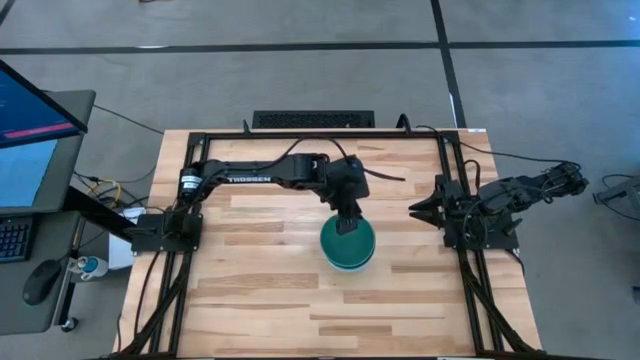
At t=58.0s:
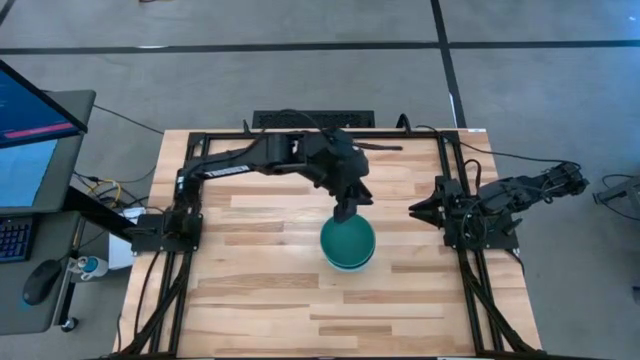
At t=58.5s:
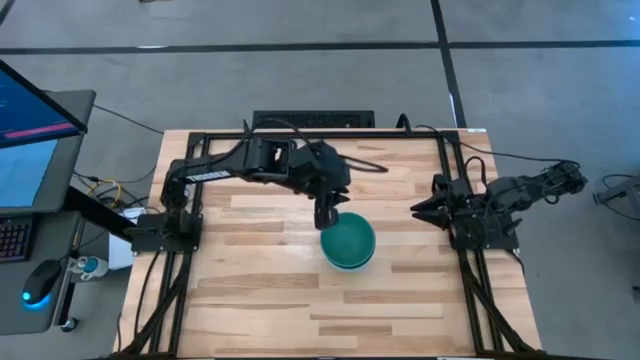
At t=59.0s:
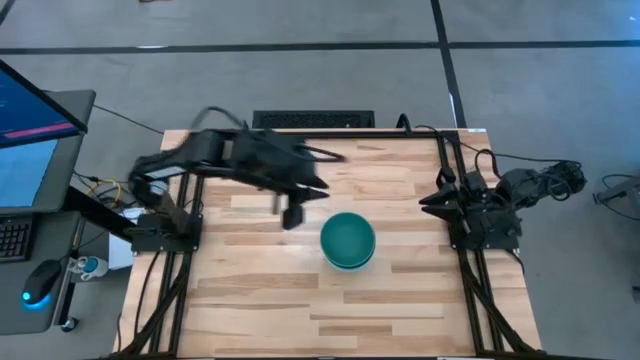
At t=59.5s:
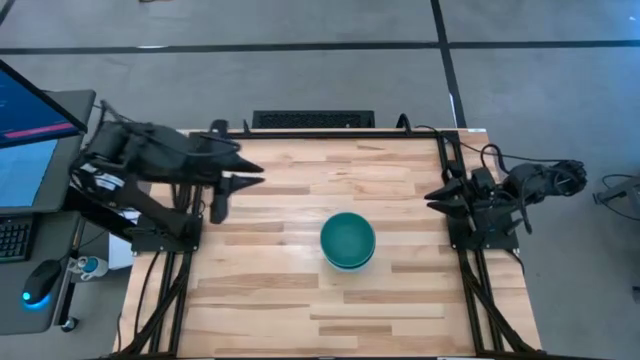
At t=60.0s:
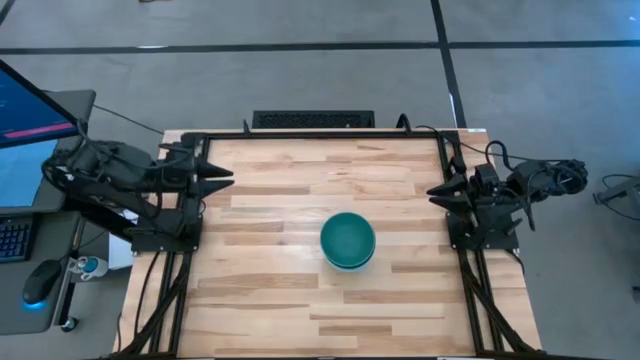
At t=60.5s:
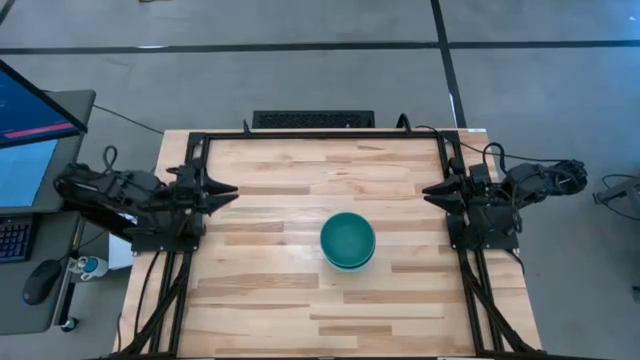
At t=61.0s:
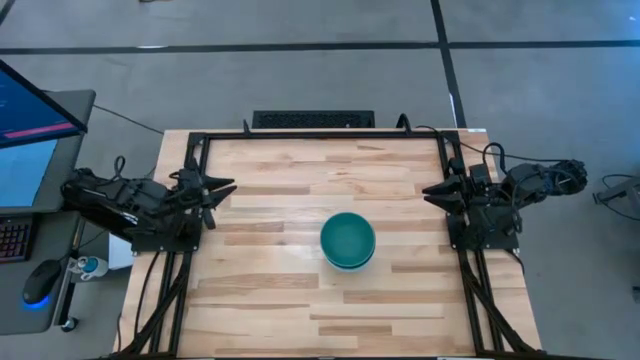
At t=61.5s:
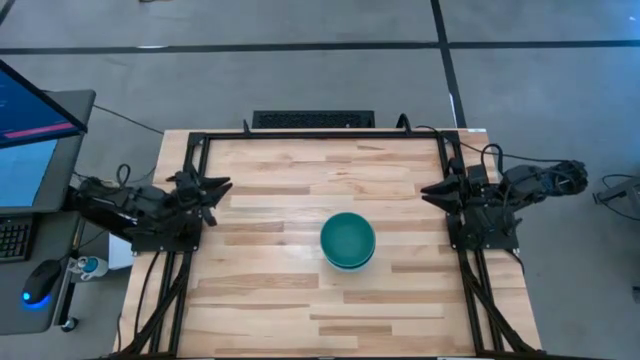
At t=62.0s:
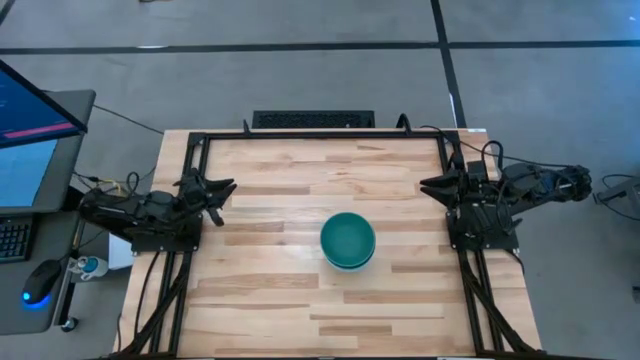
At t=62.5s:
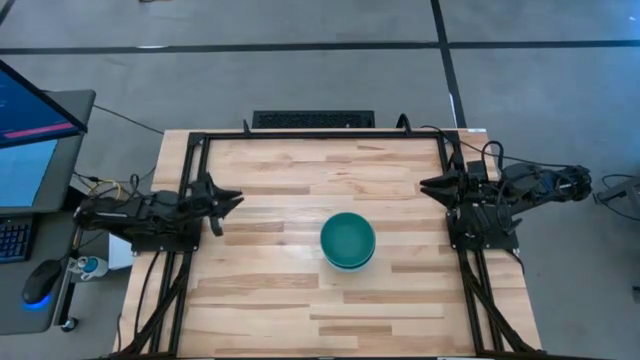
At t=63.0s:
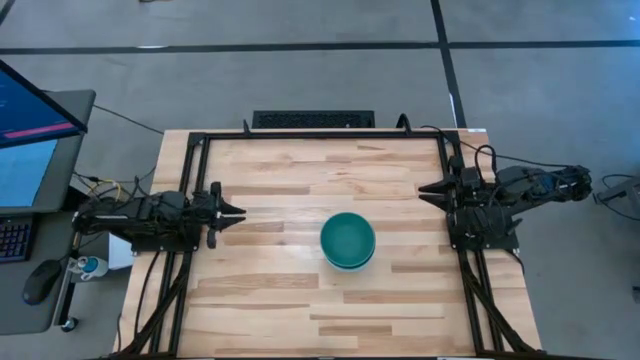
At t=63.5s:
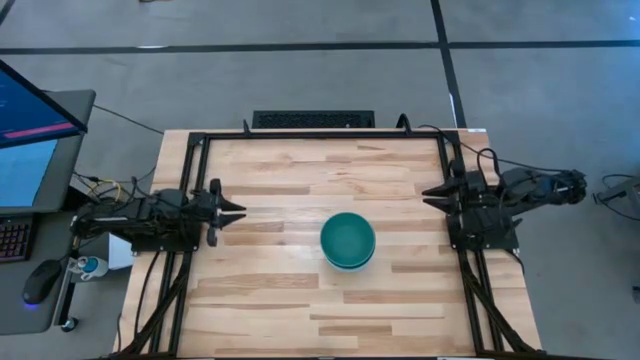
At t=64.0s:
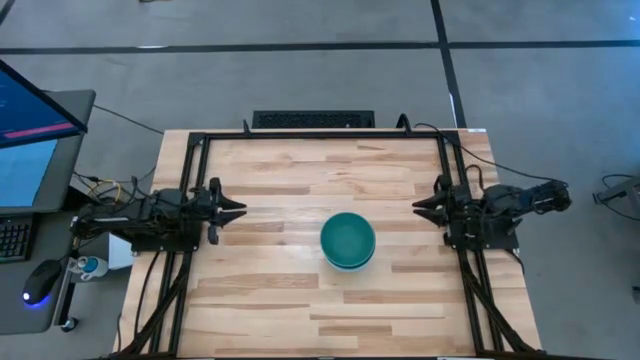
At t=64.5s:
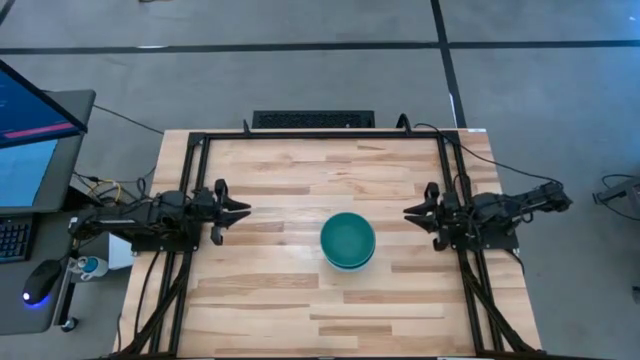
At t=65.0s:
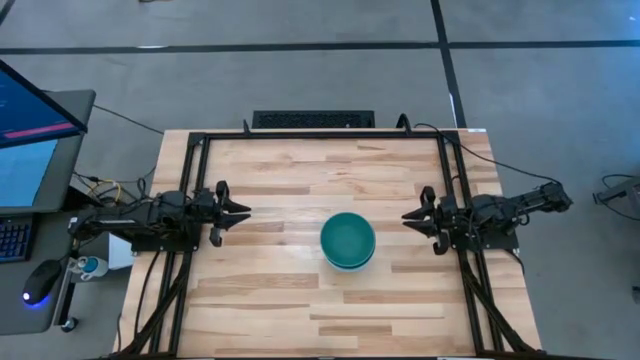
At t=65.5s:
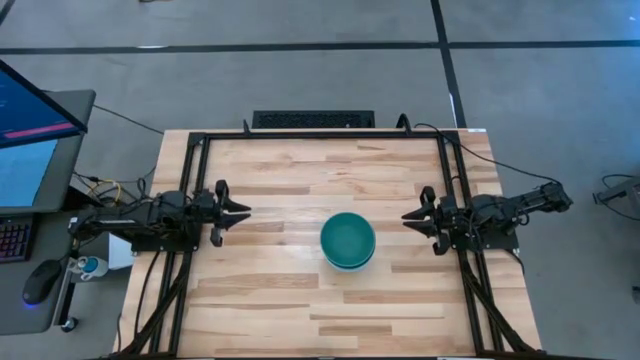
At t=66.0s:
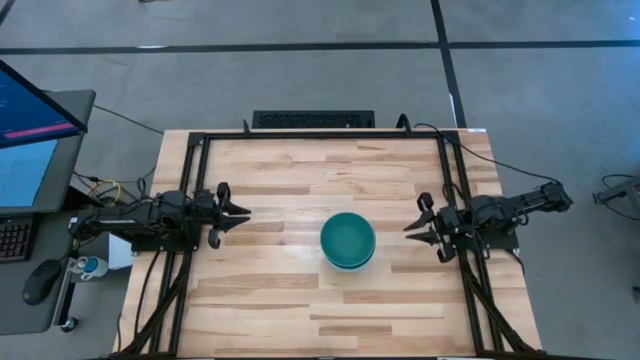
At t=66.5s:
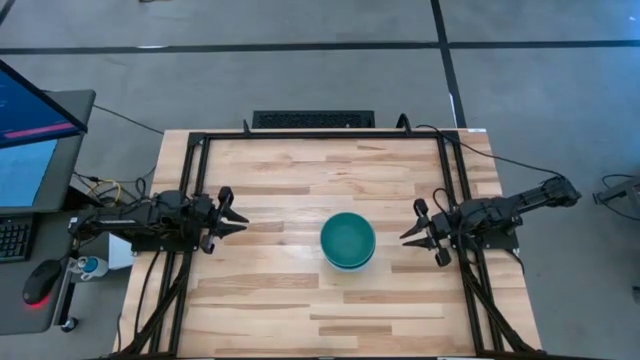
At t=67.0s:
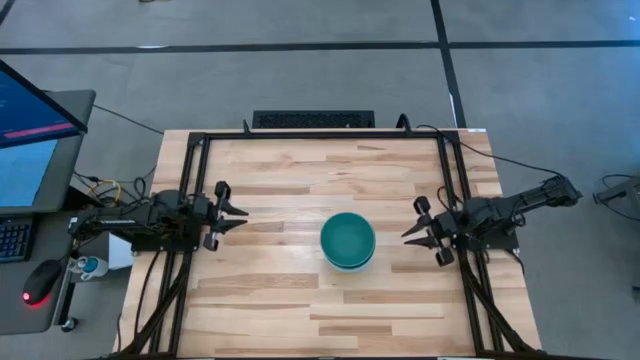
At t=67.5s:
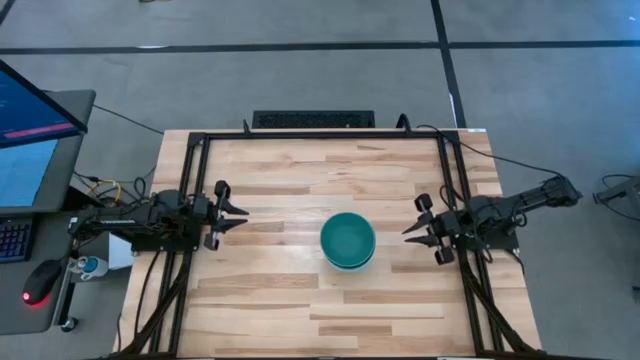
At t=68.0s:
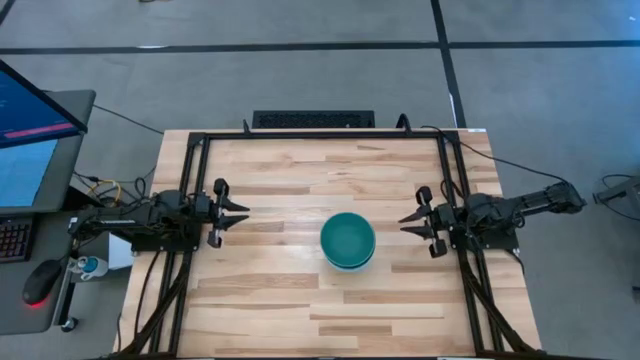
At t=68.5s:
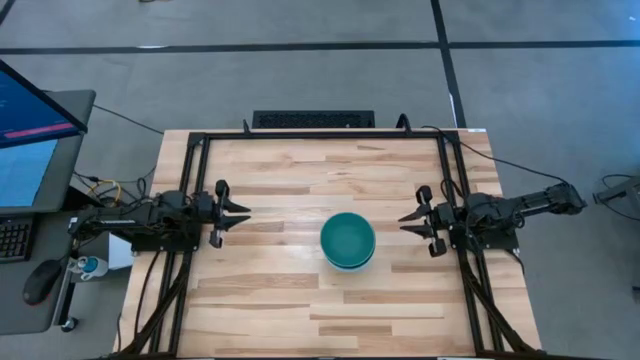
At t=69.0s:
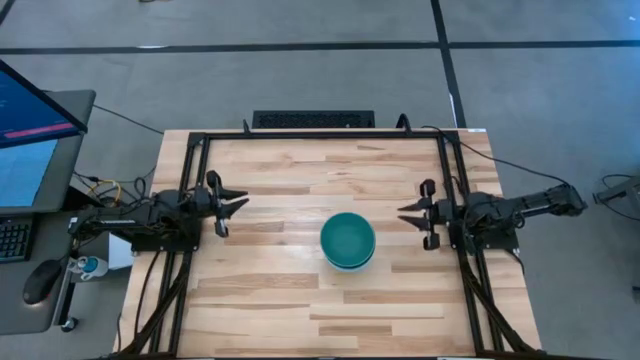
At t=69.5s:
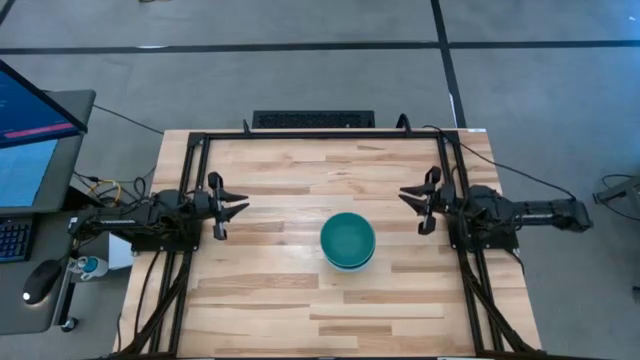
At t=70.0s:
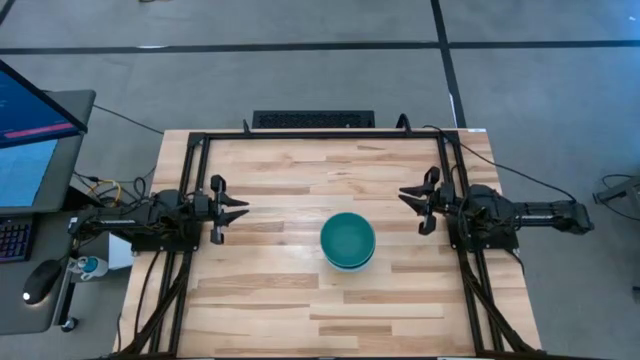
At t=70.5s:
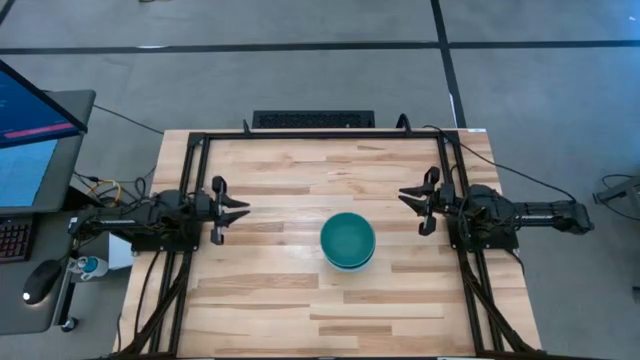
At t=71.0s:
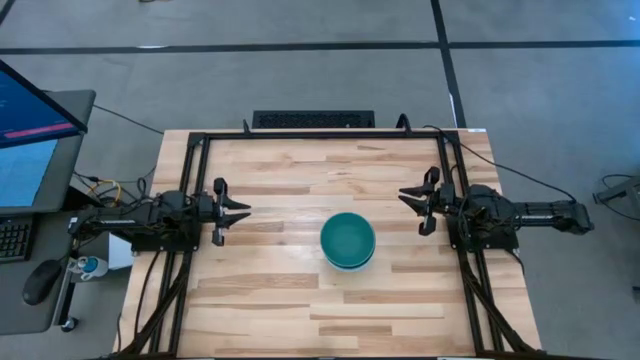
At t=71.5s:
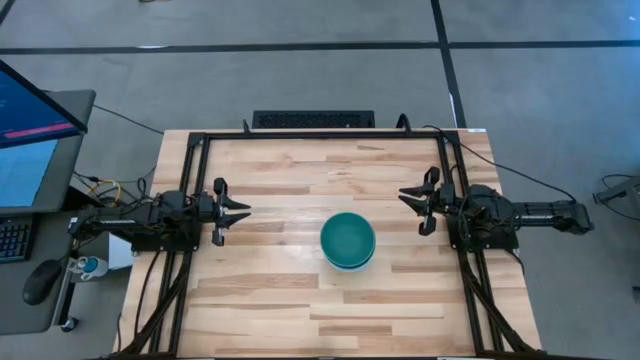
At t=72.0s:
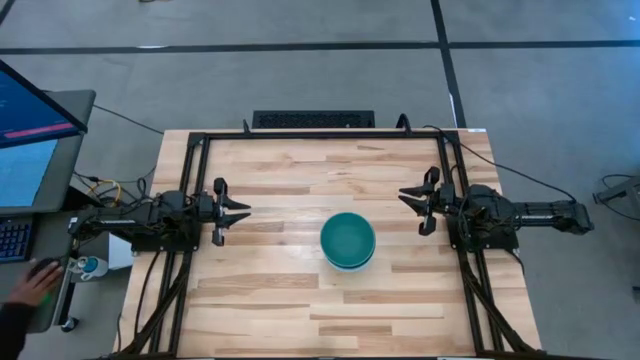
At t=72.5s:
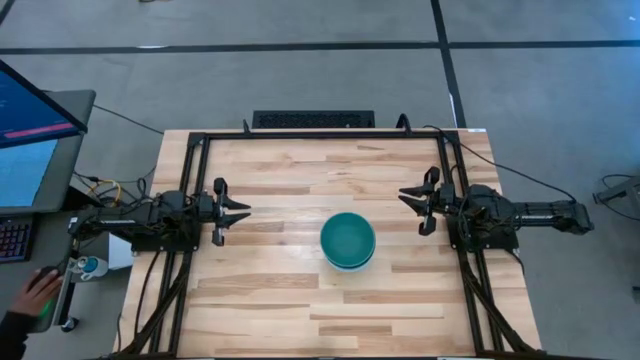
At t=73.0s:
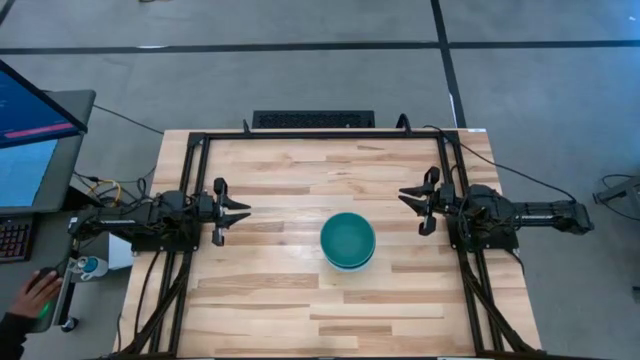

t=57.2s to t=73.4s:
Task: Nest bowls inside each other
Return to Home Position

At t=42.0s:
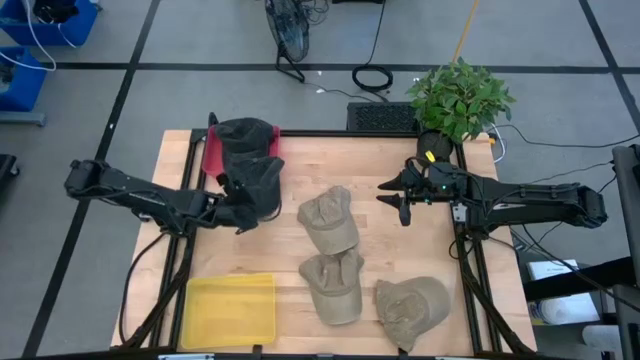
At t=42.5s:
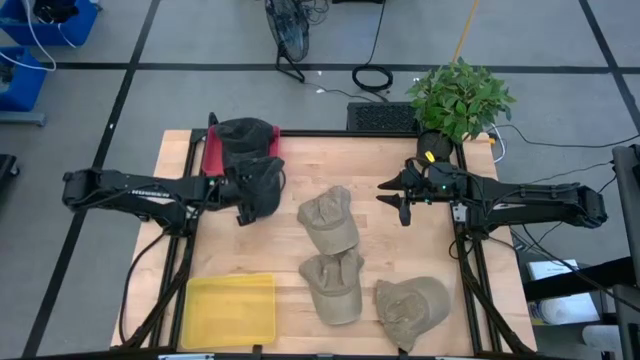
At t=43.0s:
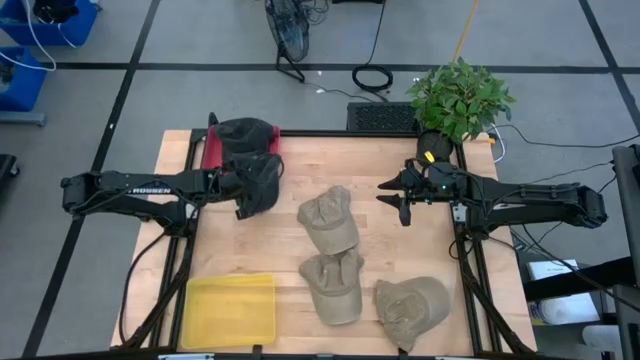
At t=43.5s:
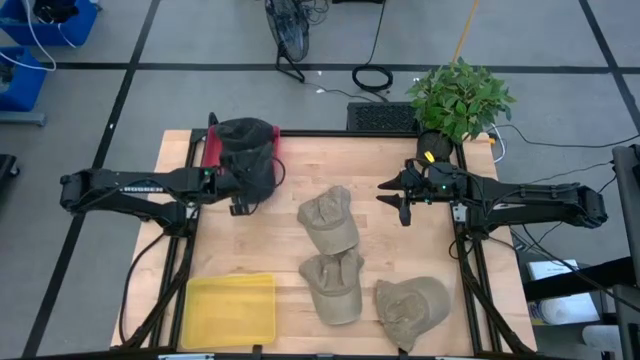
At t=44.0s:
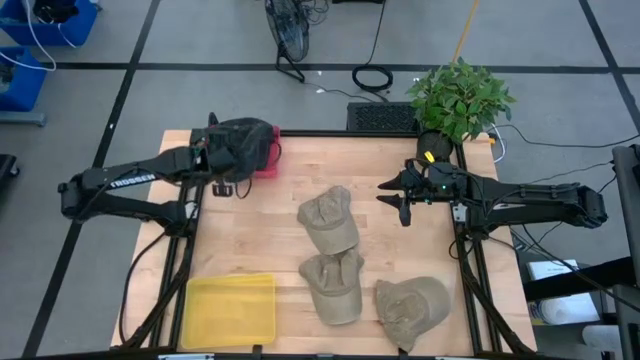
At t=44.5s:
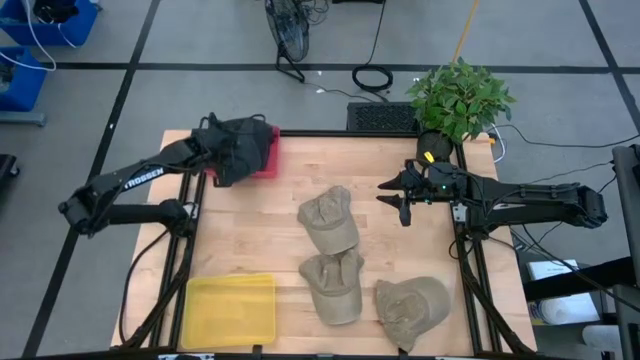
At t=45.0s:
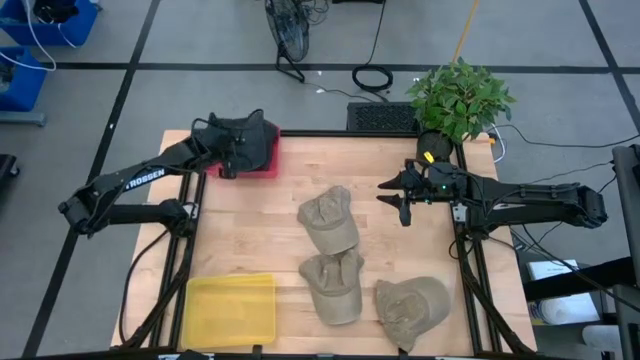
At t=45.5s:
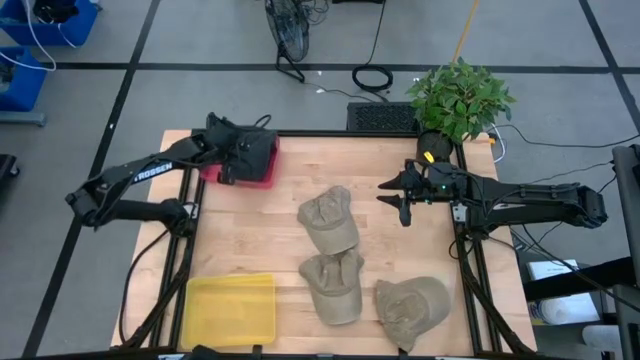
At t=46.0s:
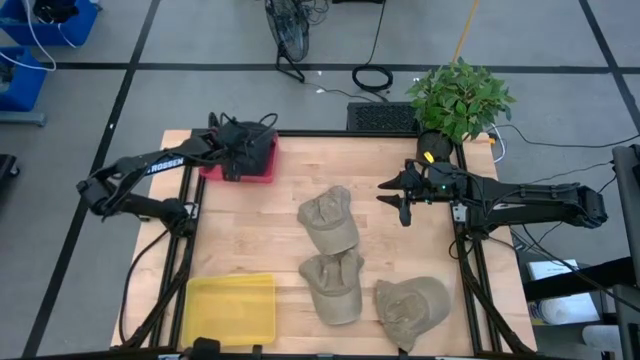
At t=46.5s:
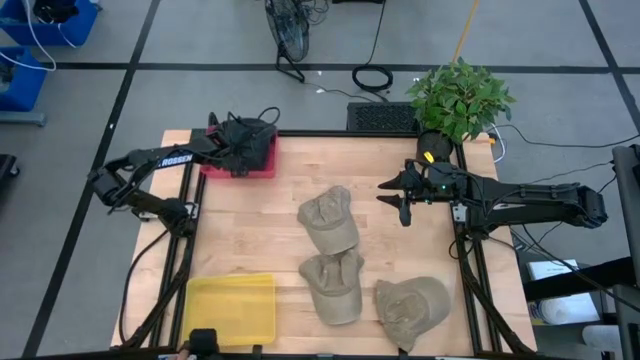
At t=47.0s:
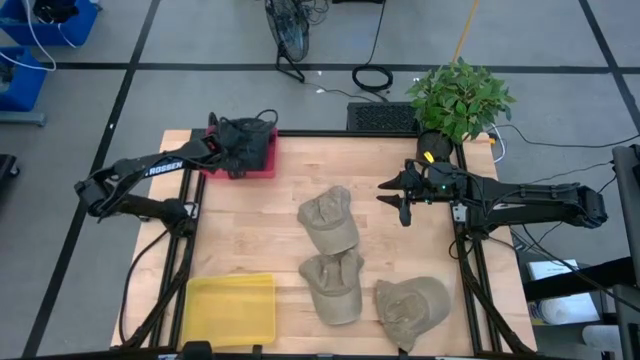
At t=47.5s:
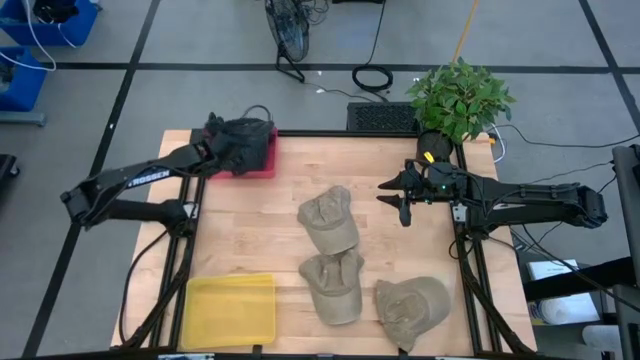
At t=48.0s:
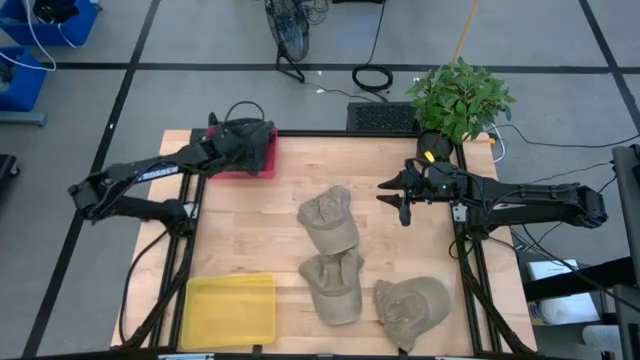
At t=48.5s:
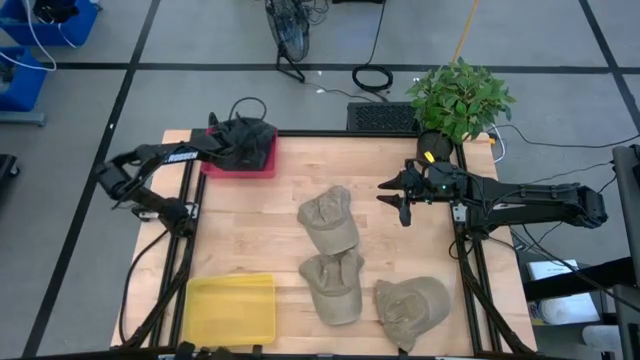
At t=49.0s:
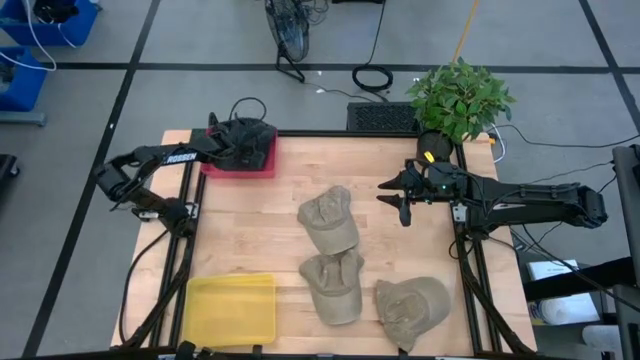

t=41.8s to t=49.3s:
Task: Pick & Place hat
Put the black cap into the red bin
